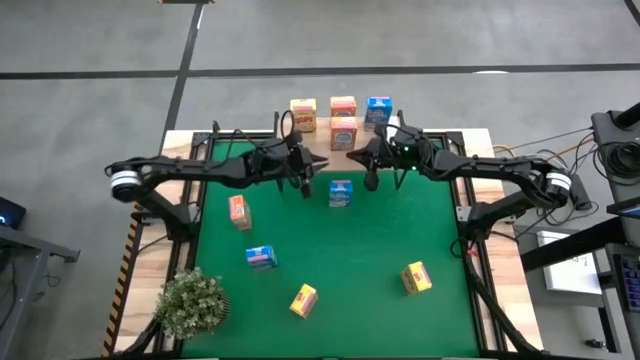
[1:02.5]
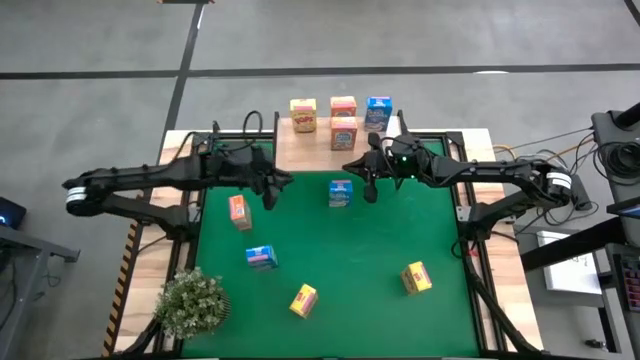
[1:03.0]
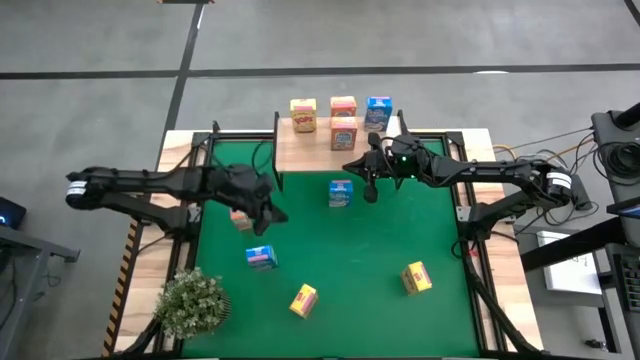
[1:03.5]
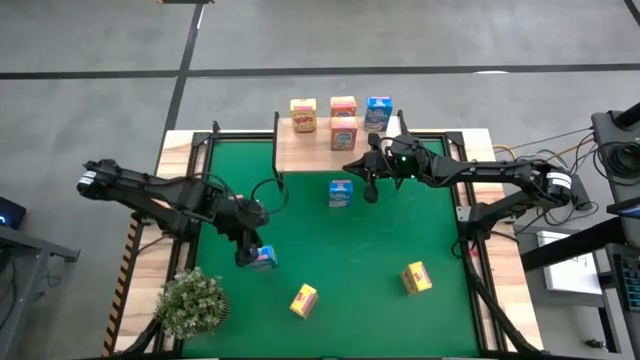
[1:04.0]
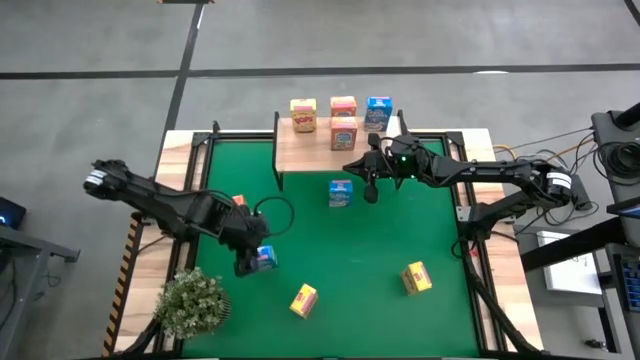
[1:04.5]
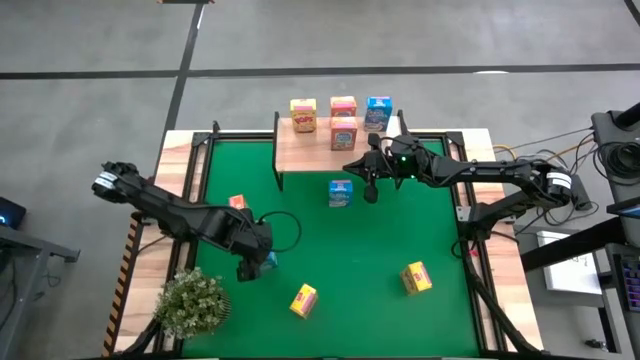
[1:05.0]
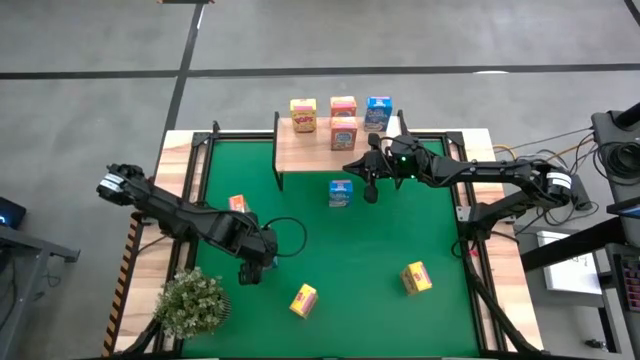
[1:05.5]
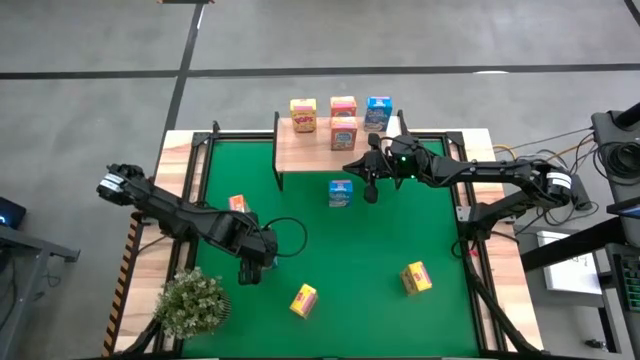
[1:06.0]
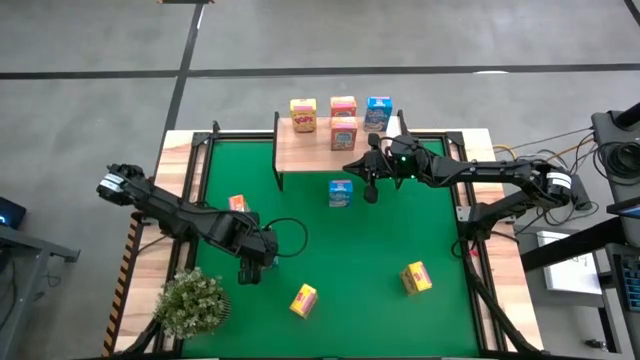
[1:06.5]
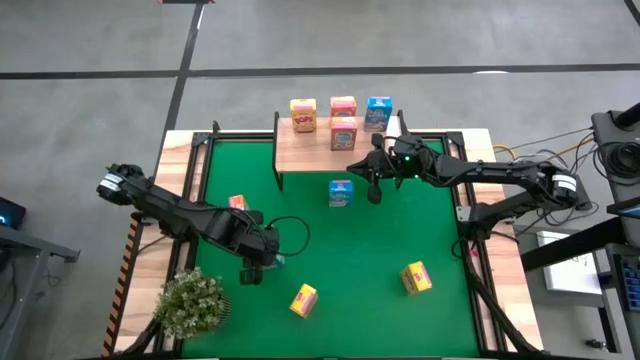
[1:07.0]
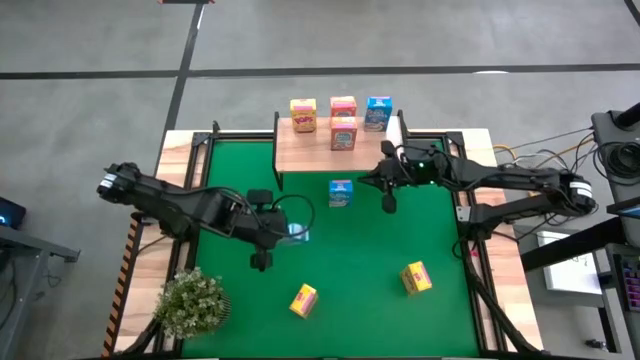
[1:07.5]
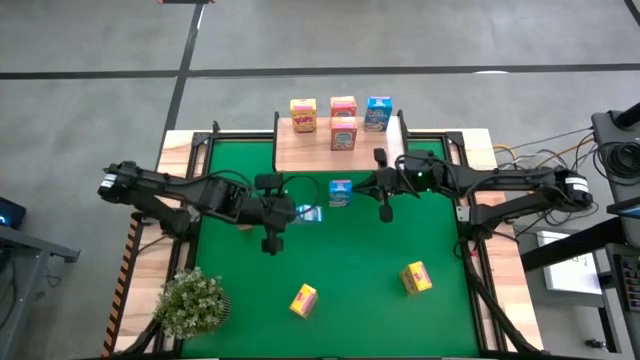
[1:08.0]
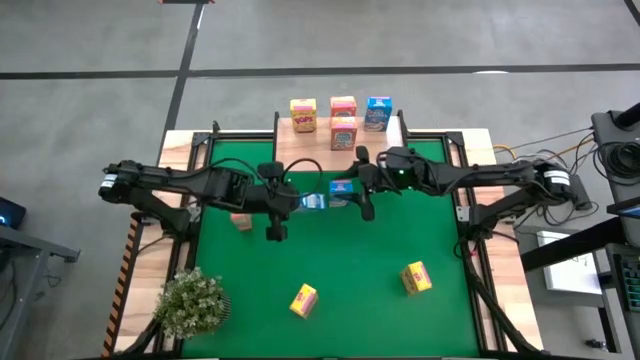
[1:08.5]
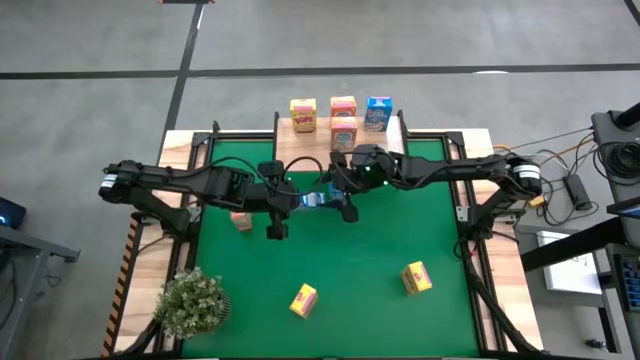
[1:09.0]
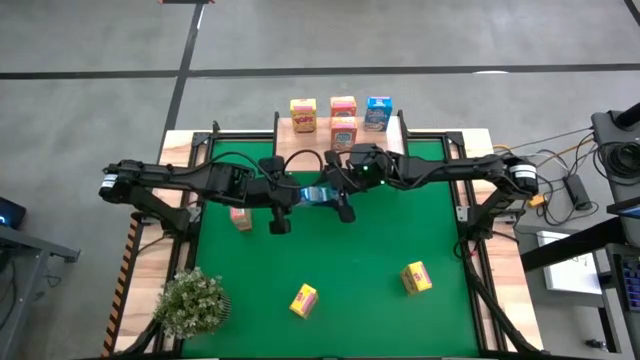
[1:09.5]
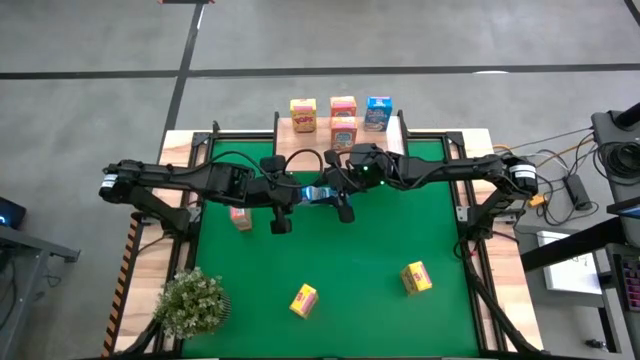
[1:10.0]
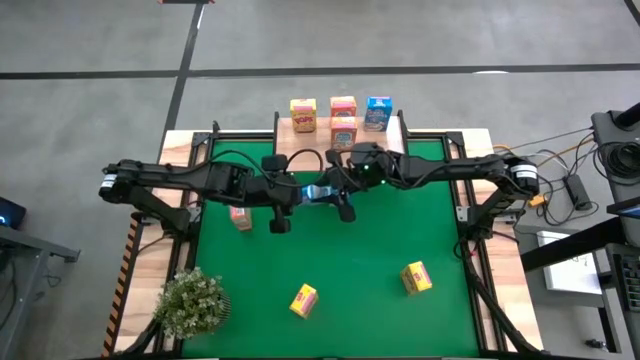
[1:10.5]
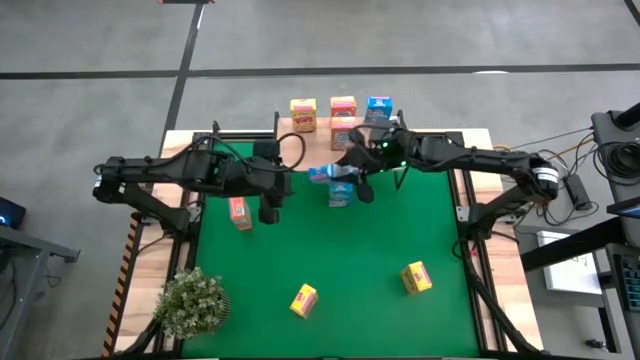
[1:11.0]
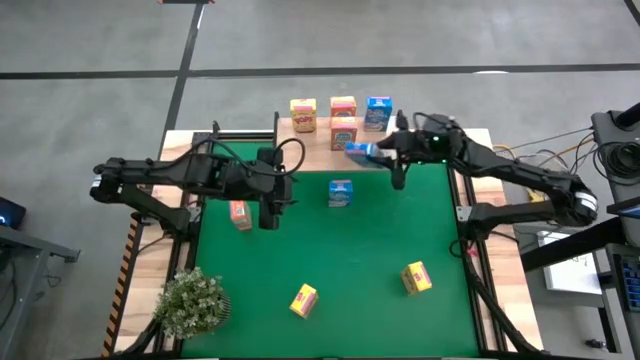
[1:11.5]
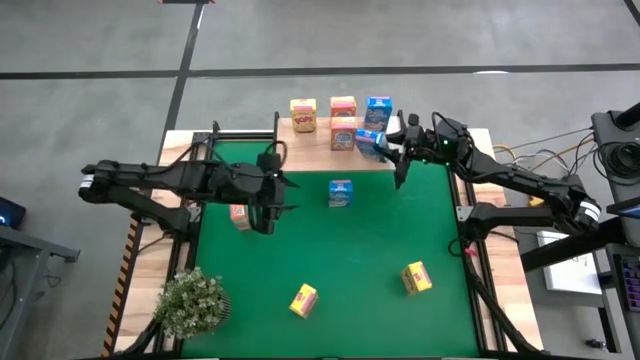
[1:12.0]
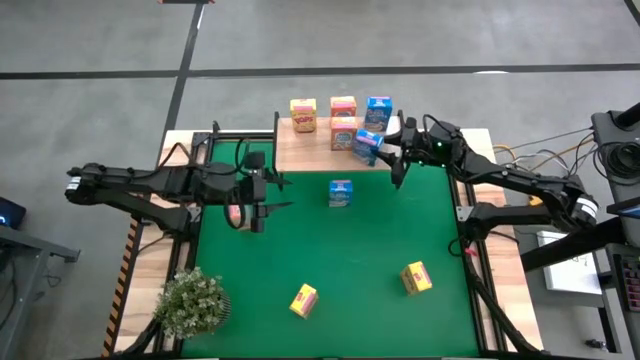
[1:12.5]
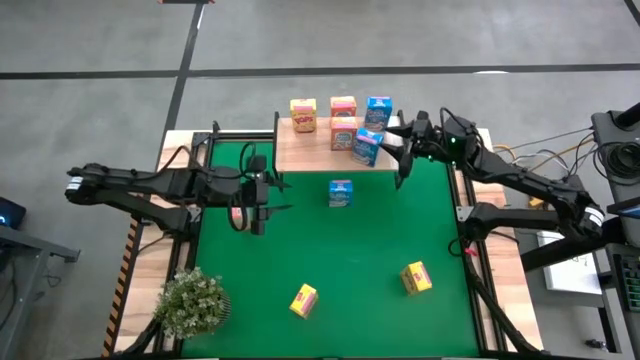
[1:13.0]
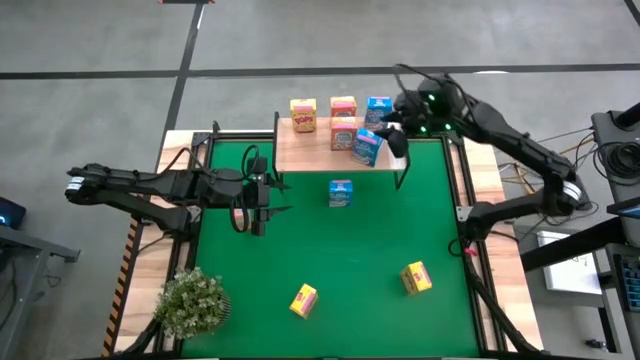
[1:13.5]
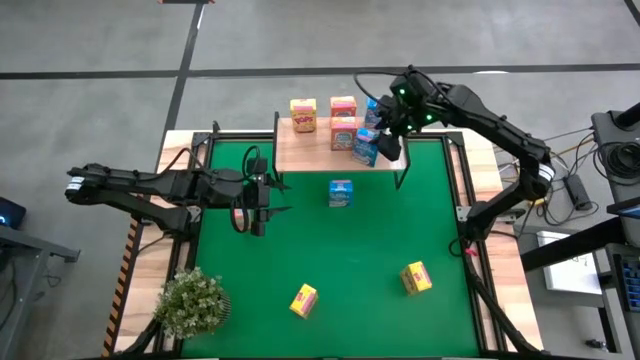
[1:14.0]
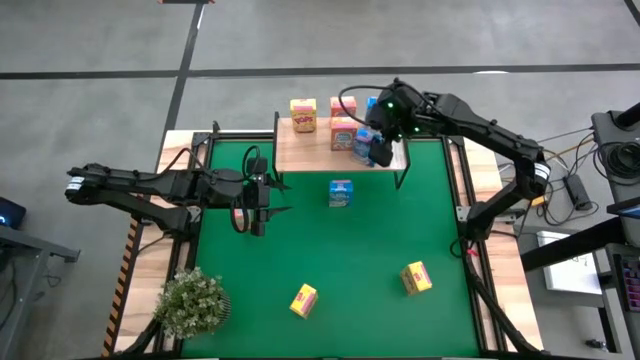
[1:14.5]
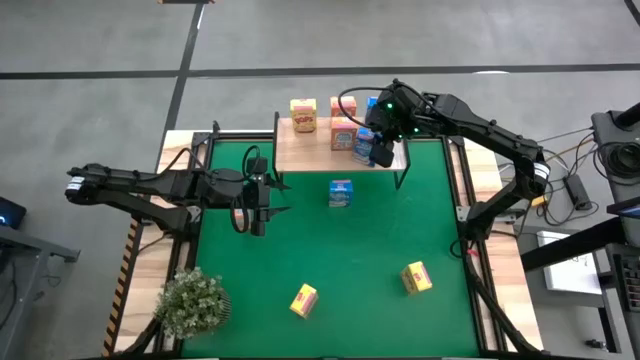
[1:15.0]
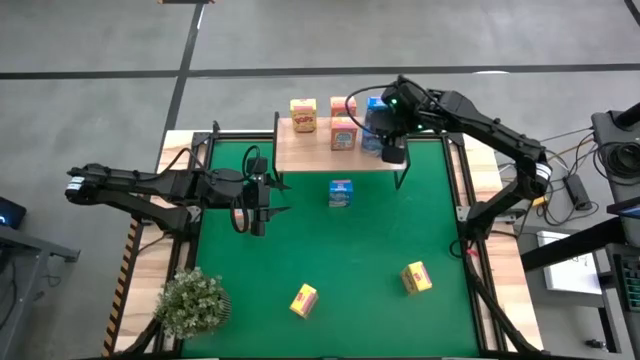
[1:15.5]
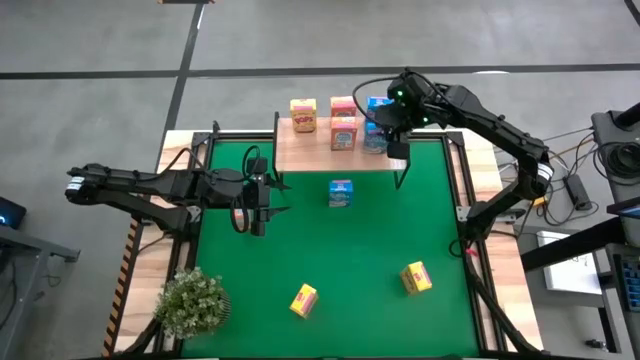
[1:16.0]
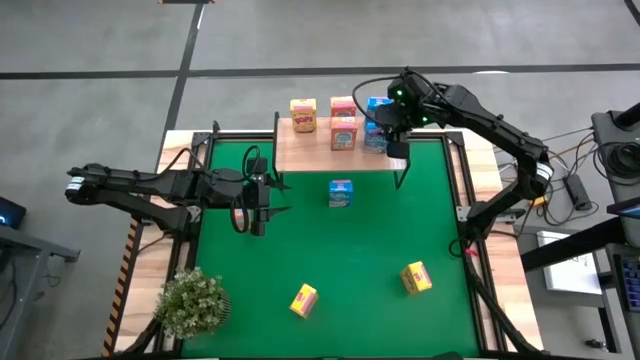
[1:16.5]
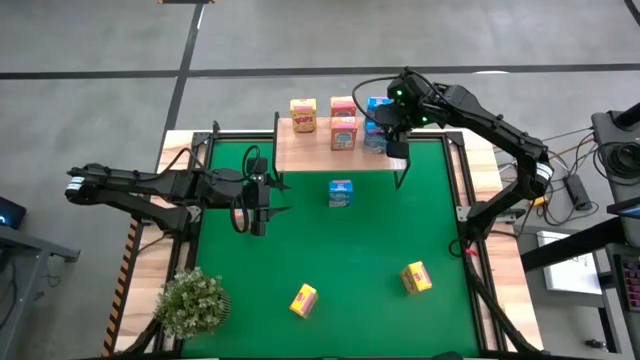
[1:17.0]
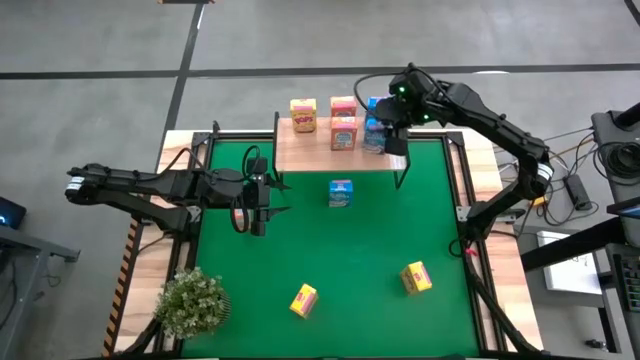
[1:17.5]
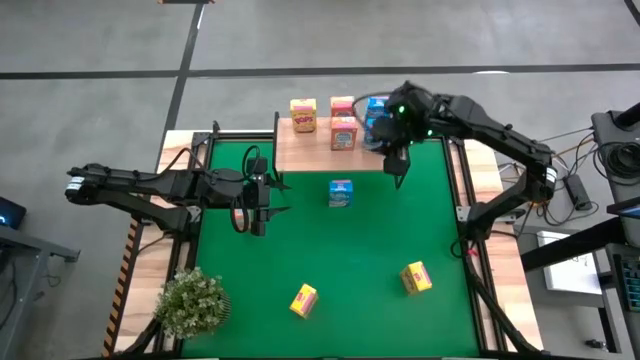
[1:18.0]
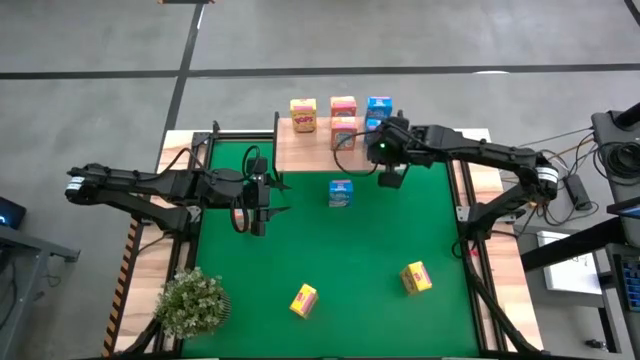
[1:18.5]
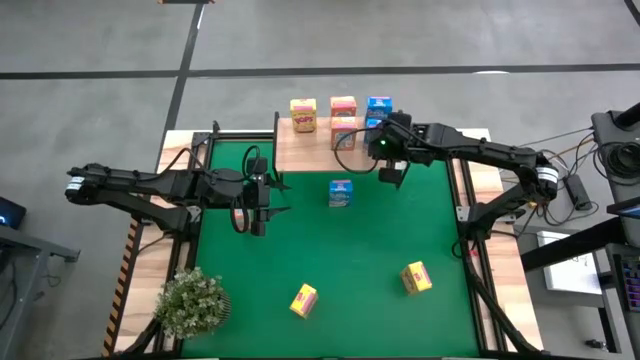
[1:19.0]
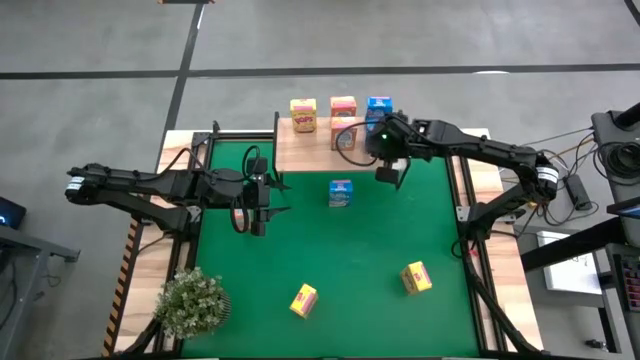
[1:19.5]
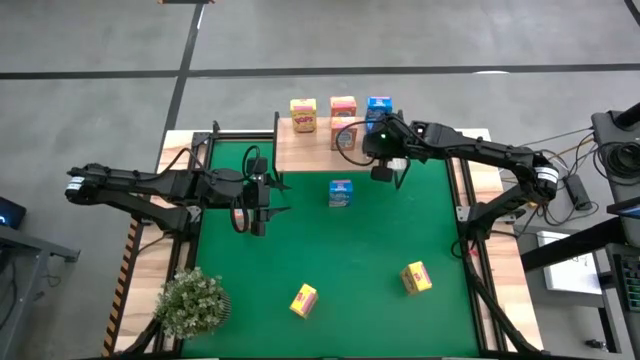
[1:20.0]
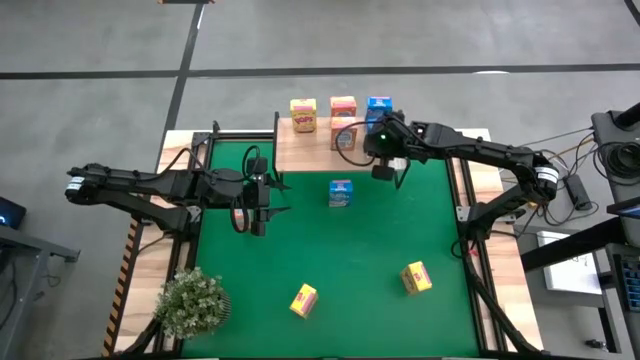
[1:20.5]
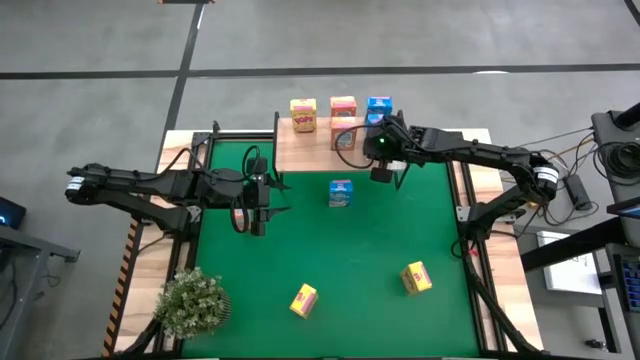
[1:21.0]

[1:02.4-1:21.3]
Task: Stack cereal on shelf
Put the left blue cereal box on the shelf aligned with the other blue cereal box

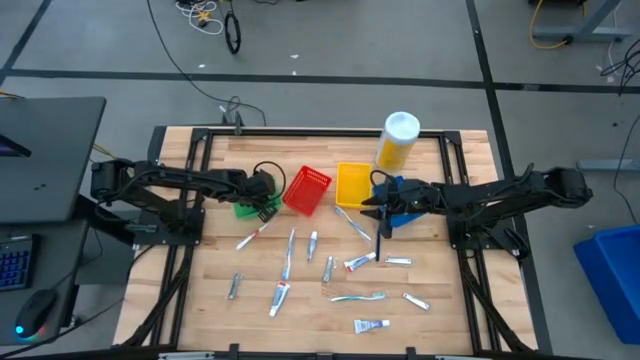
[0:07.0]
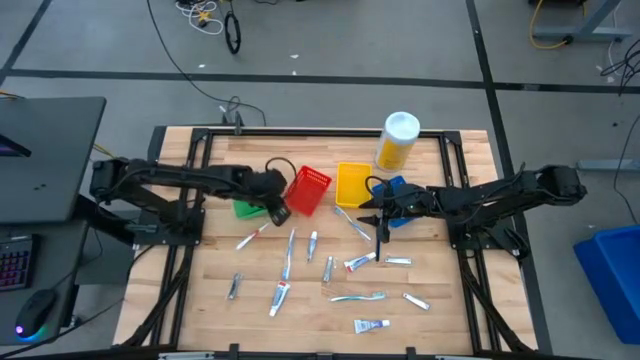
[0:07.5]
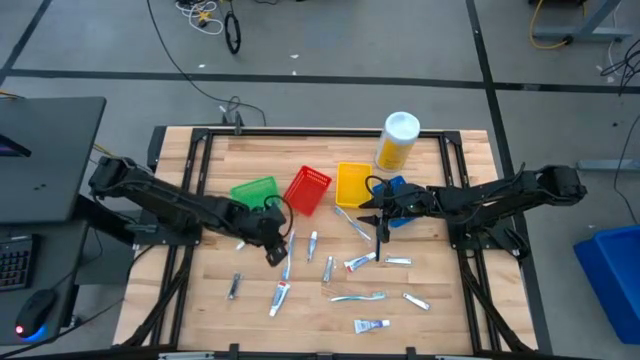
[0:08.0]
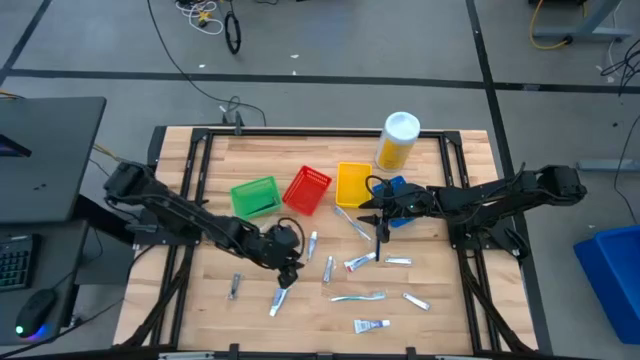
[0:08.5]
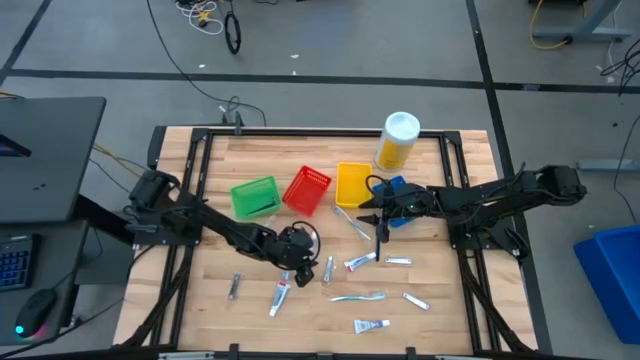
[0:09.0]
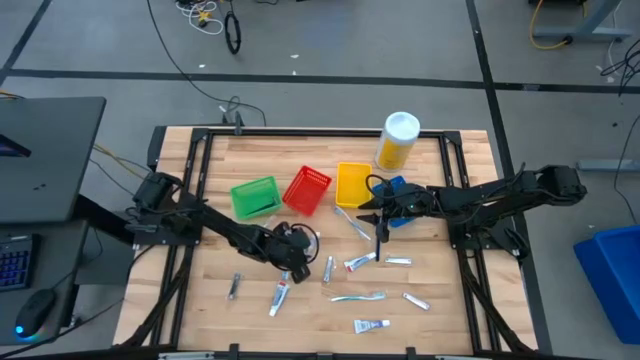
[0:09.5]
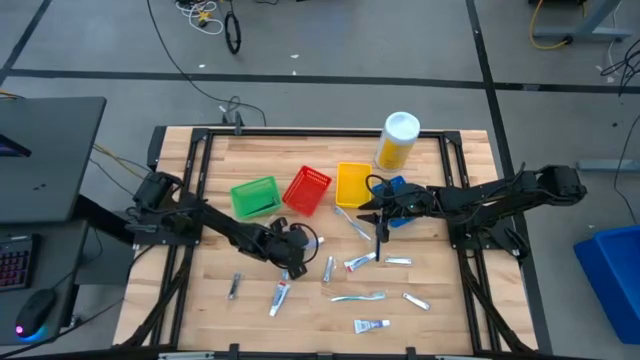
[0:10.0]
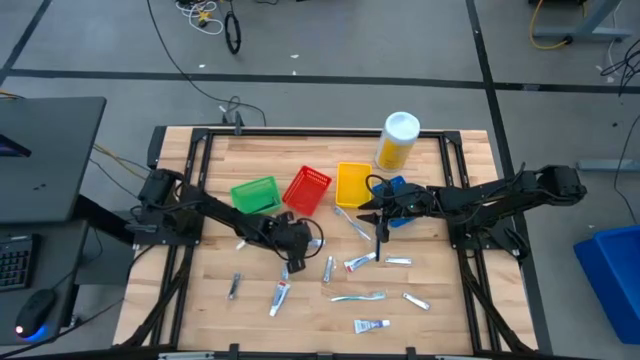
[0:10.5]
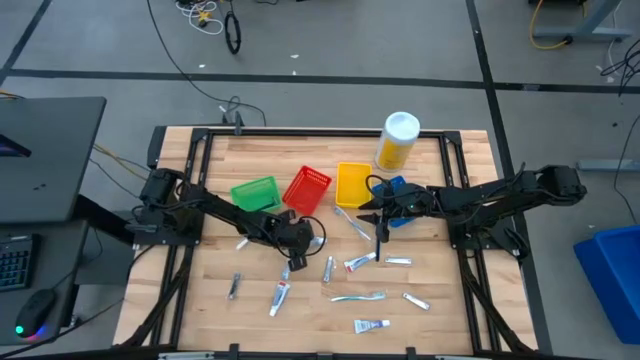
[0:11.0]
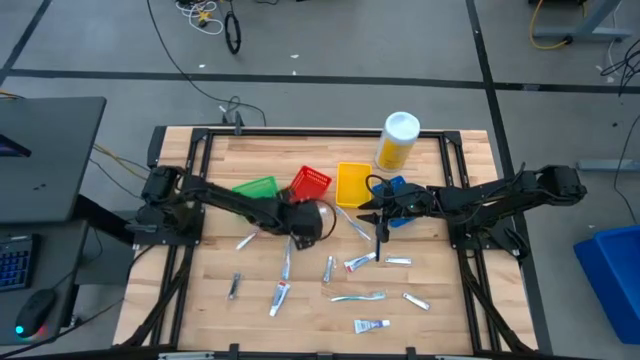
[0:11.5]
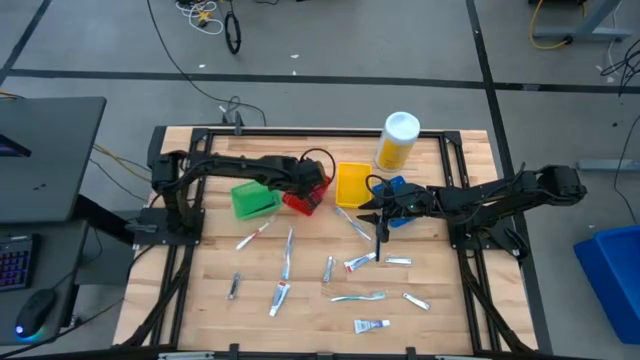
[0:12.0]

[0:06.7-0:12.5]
Task: Pick & Place Travel size toiletries
Put the white toothpaste into the red bin
